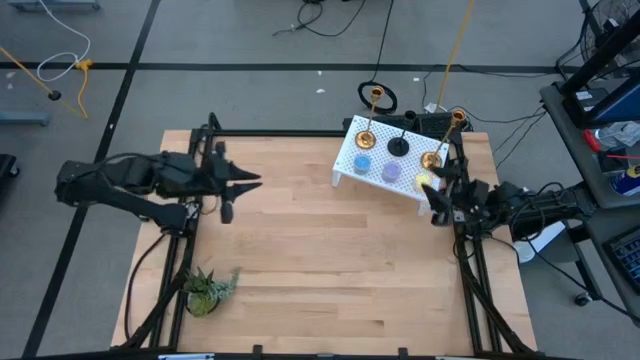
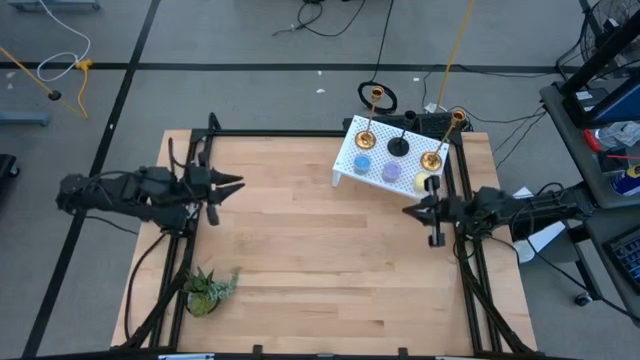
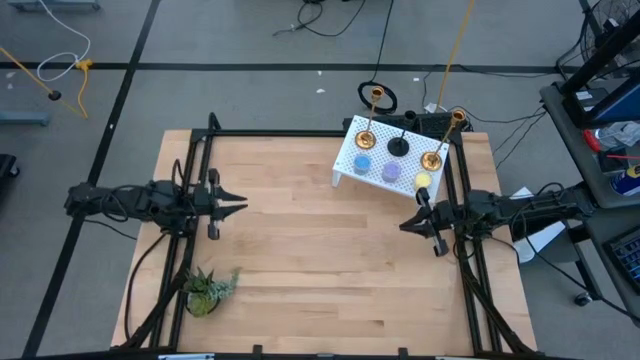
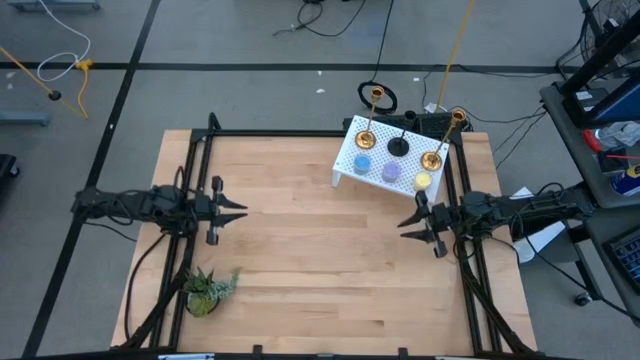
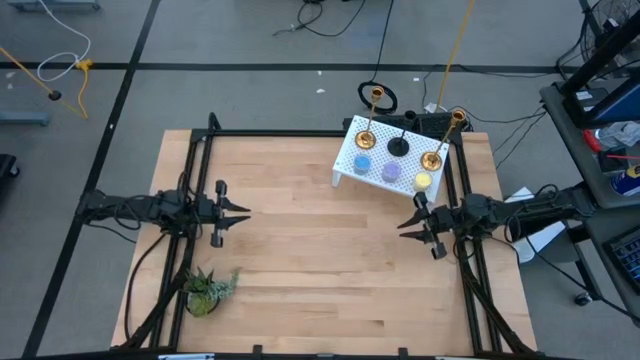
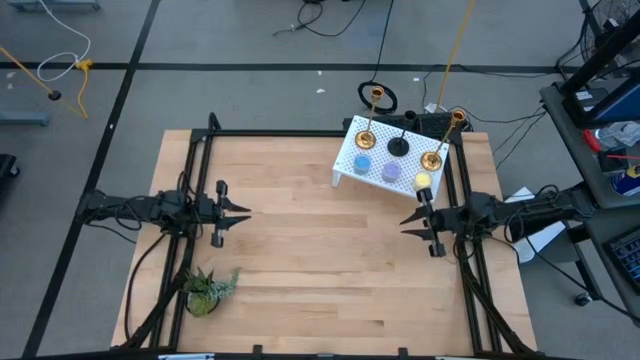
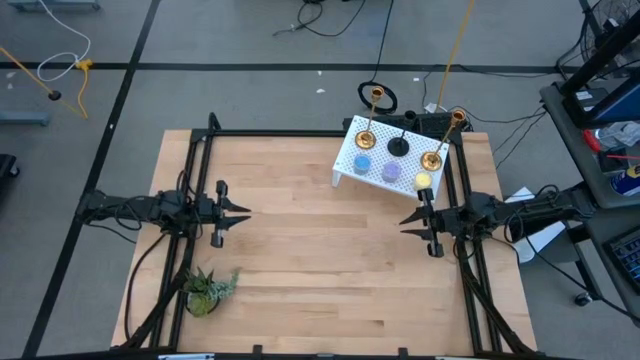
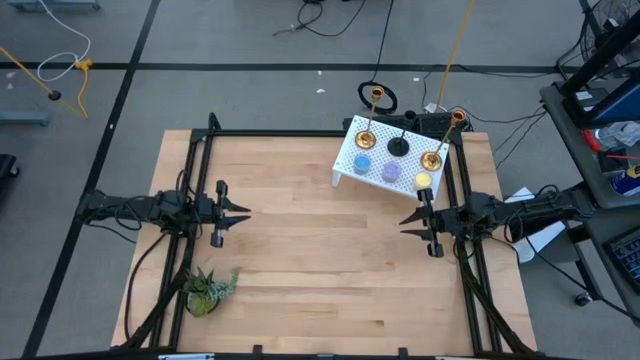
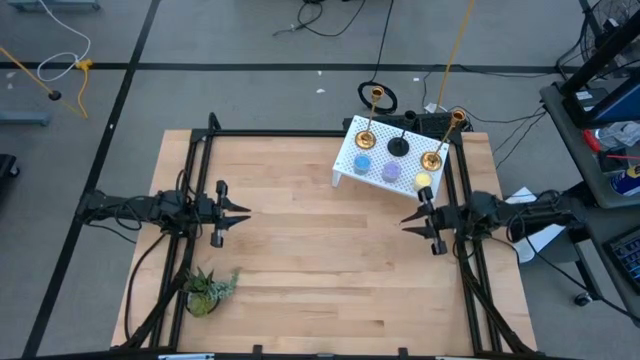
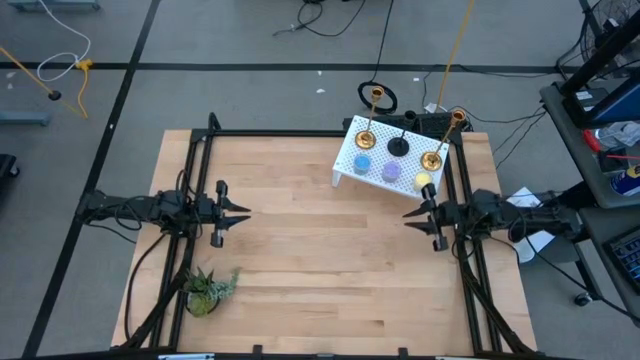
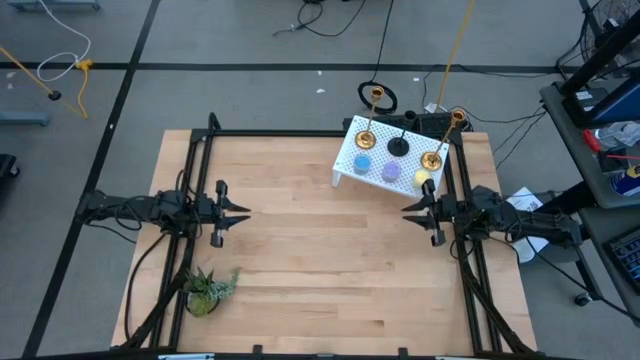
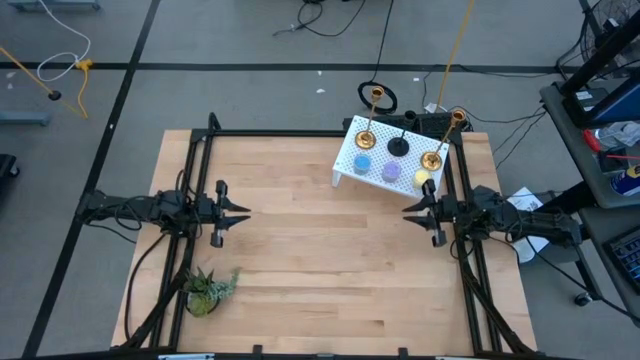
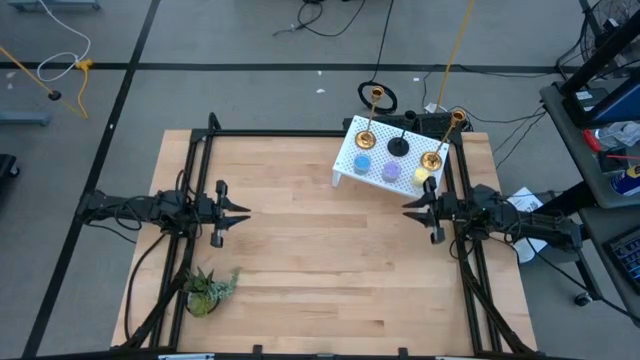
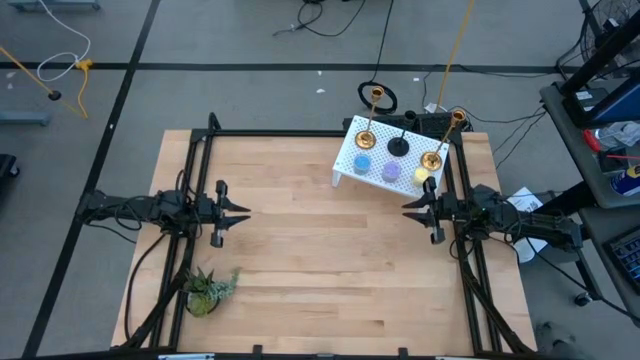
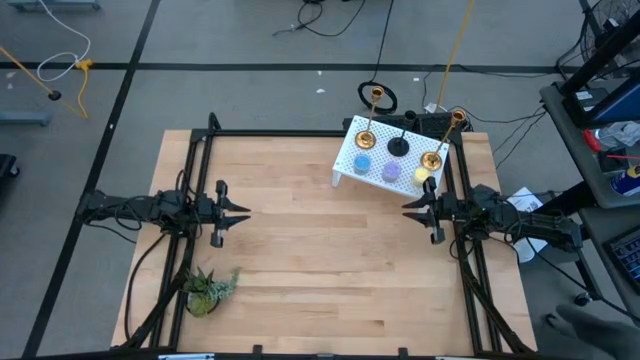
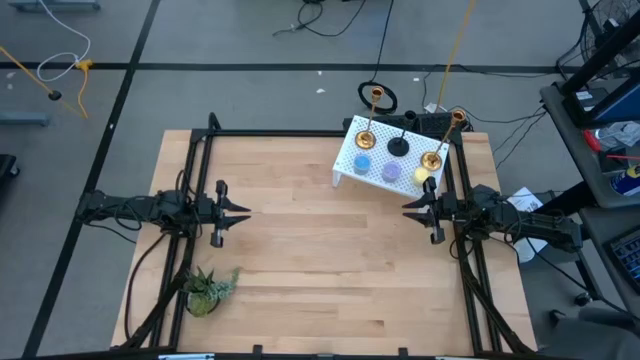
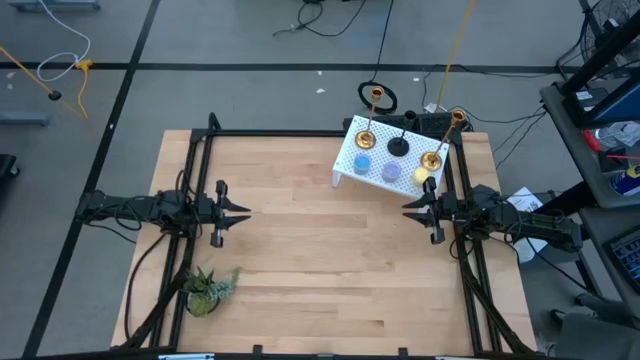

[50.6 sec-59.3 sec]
Task: Pick & Place candle stick holders
Return to Home Position

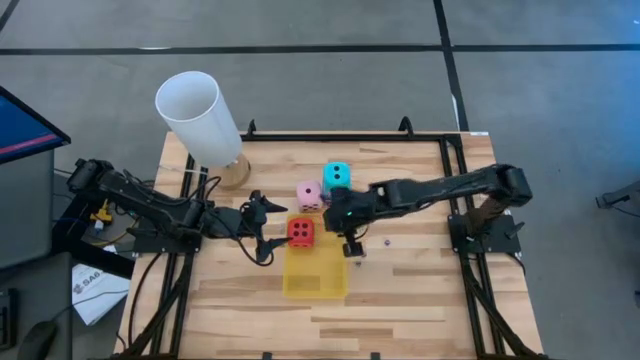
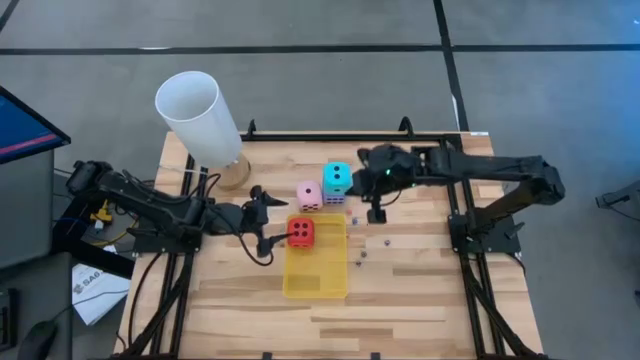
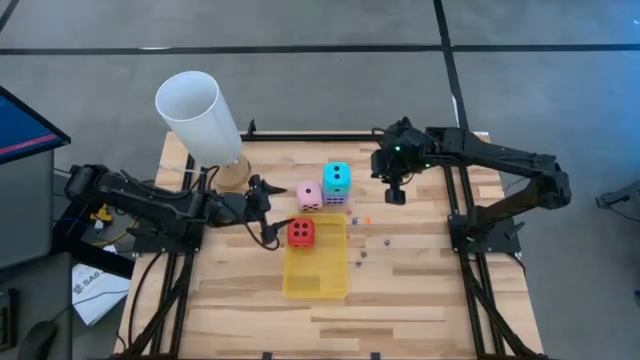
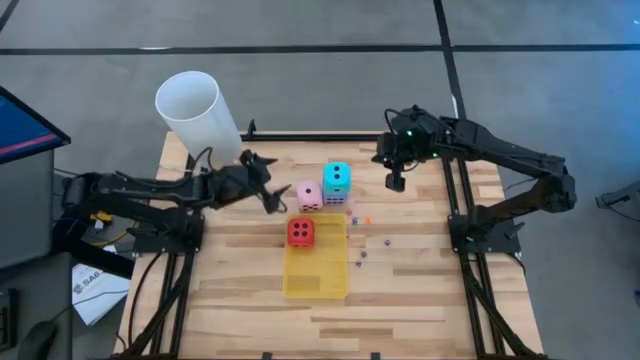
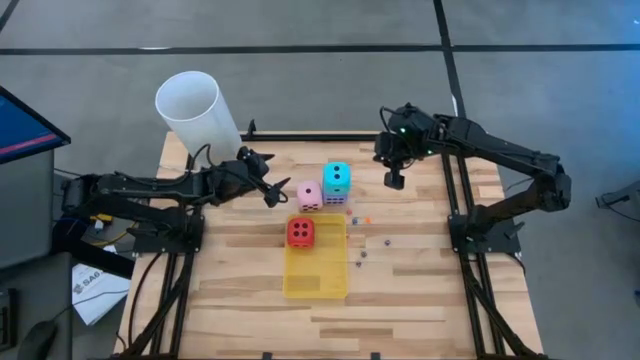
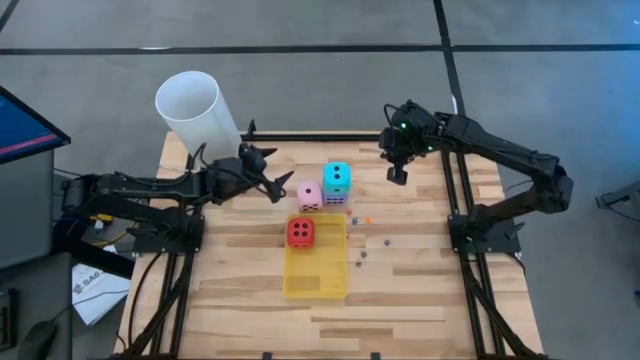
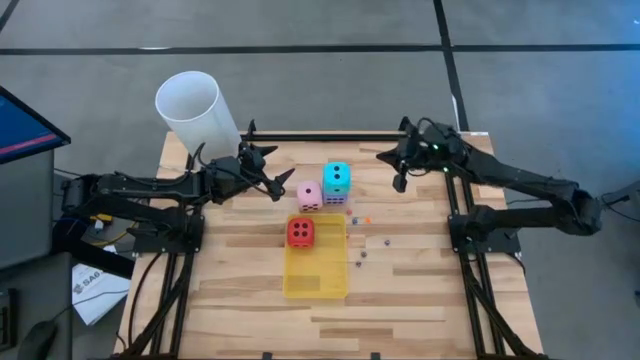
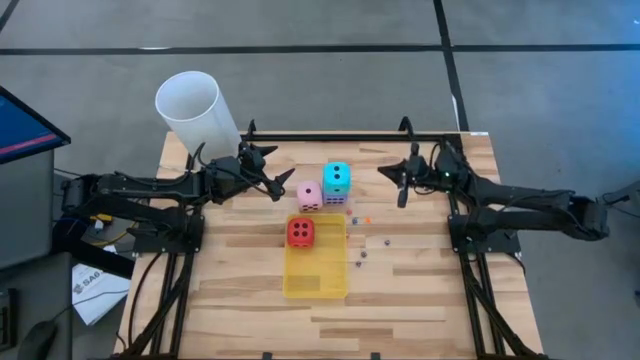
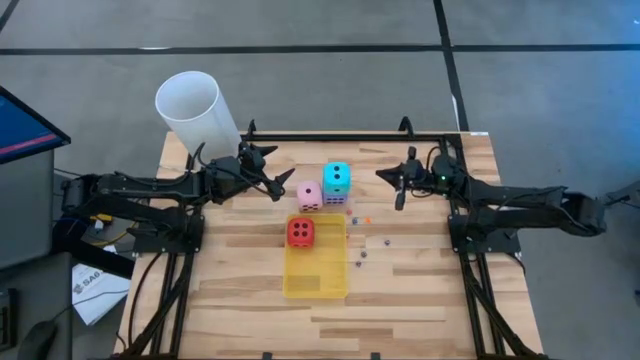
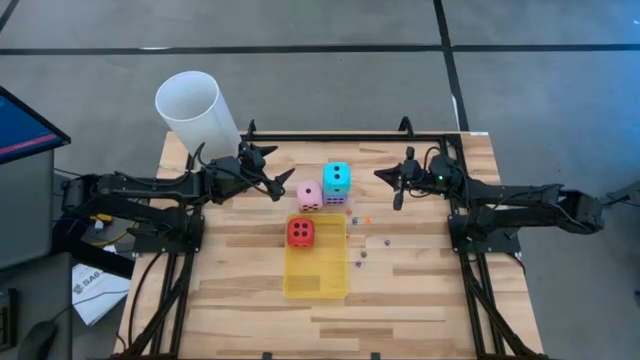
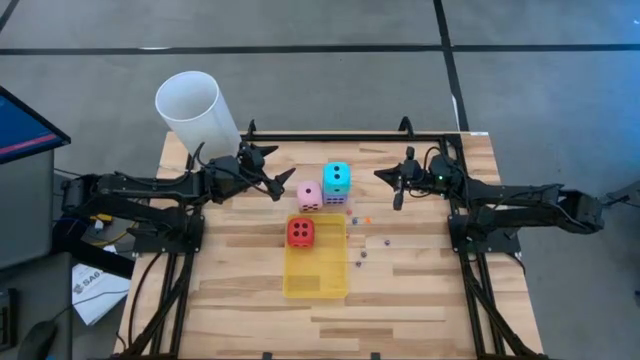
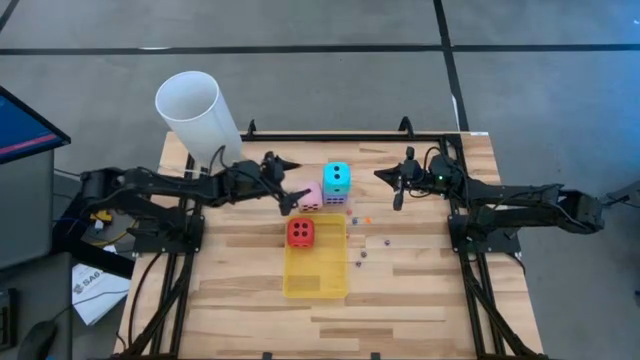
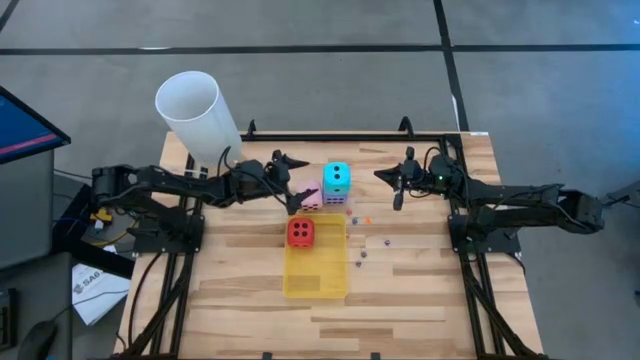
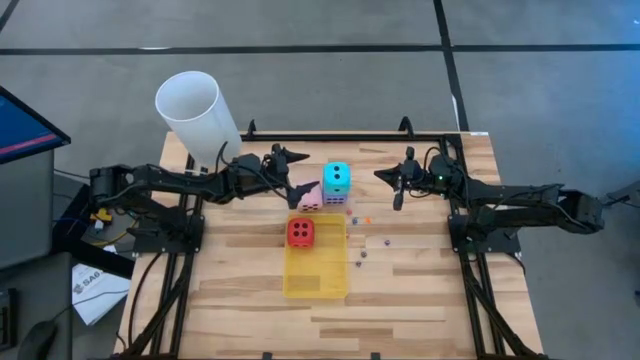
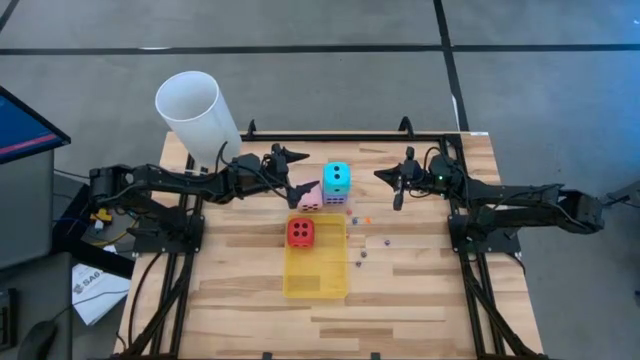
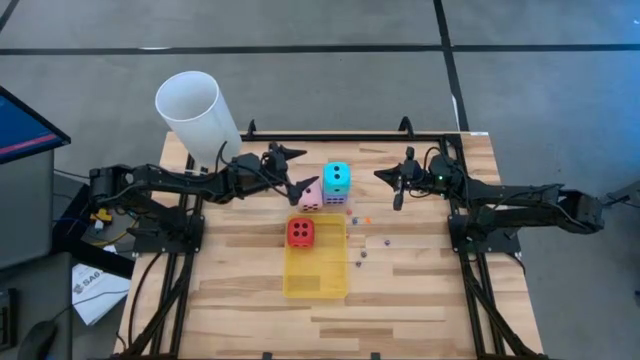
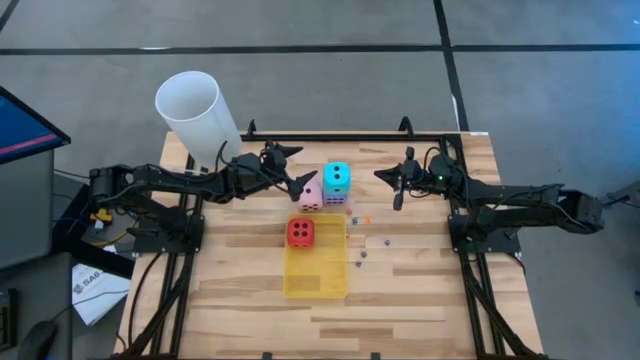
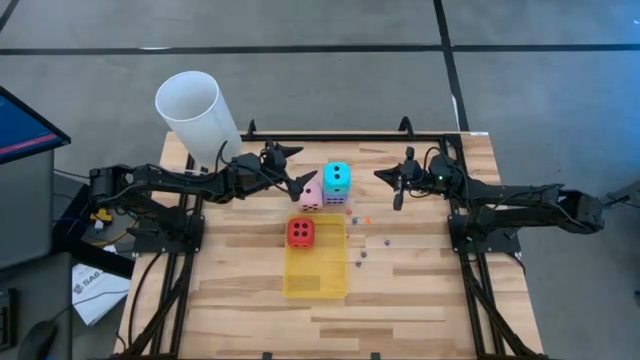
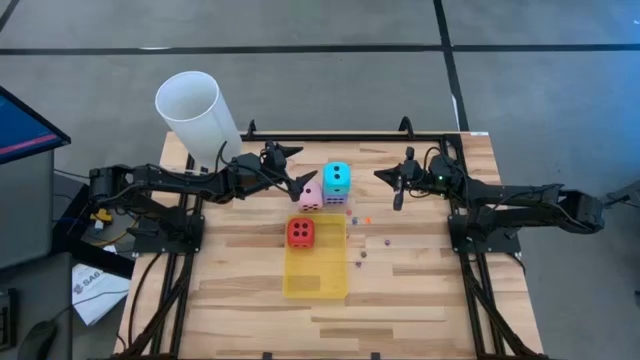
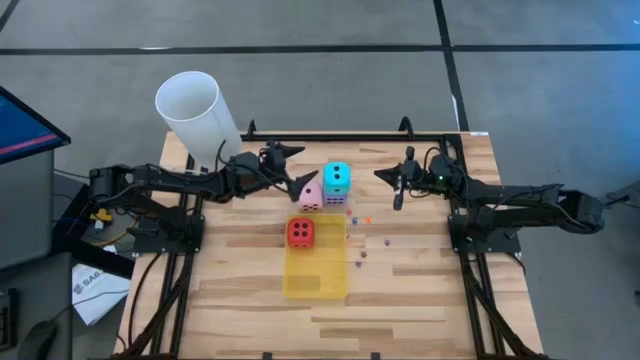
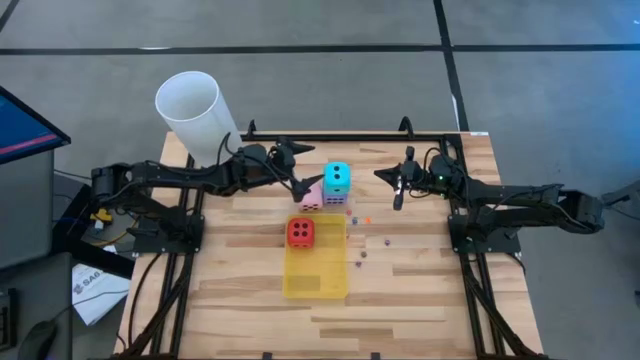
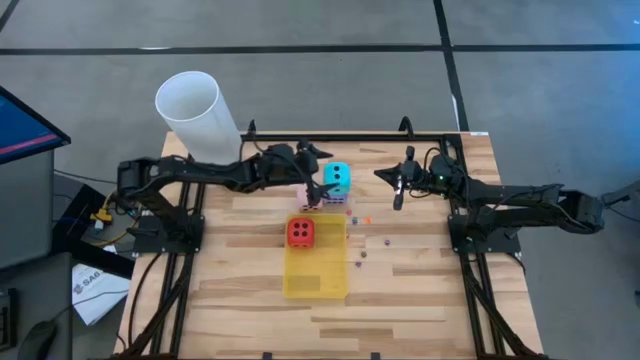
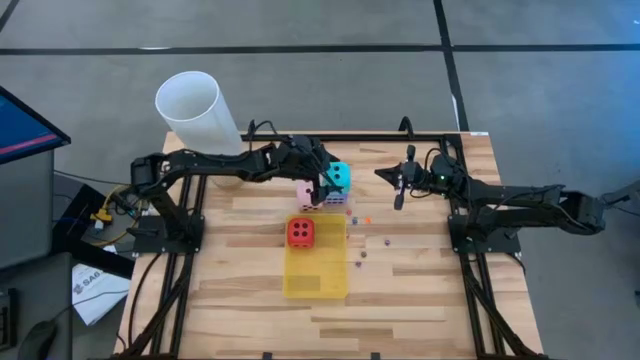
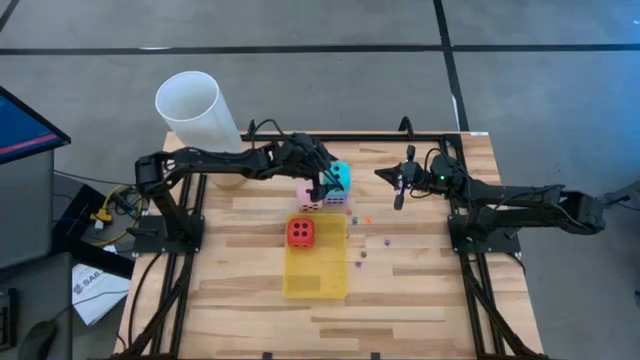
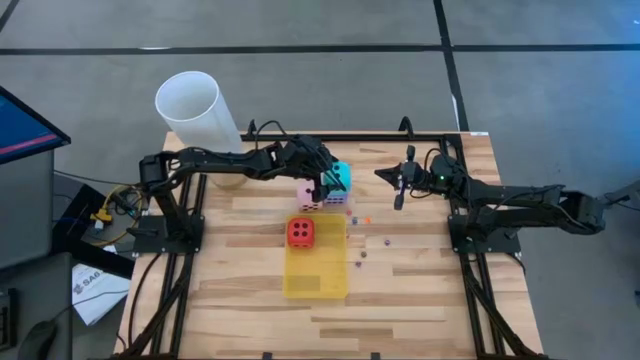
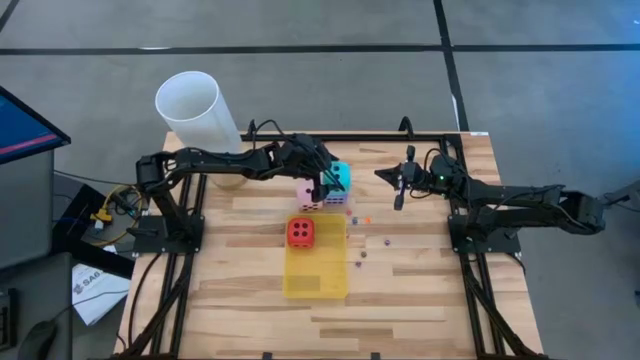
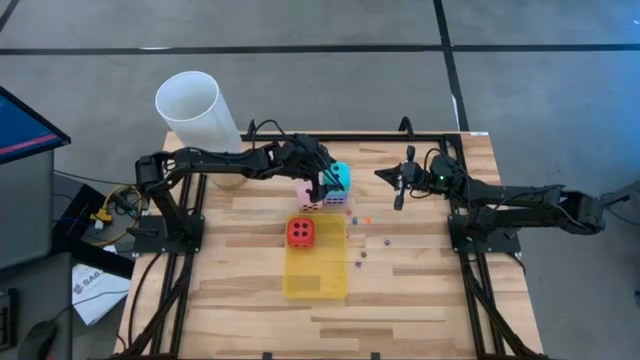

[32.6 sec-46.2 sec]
Task: Pick & Place Dice
Put the light blue die into the yellow bin
